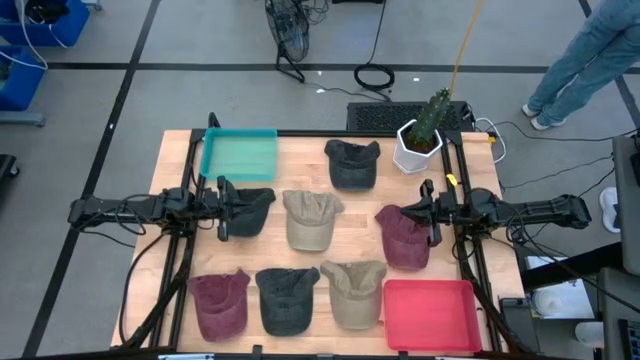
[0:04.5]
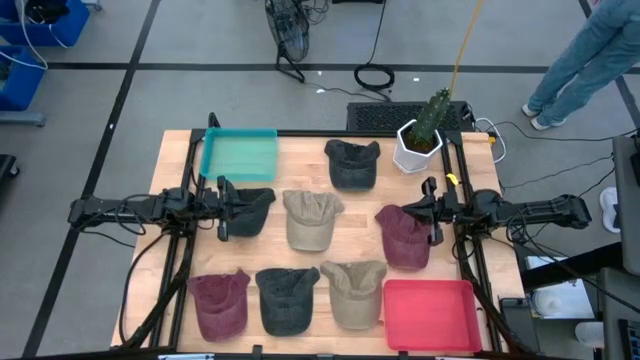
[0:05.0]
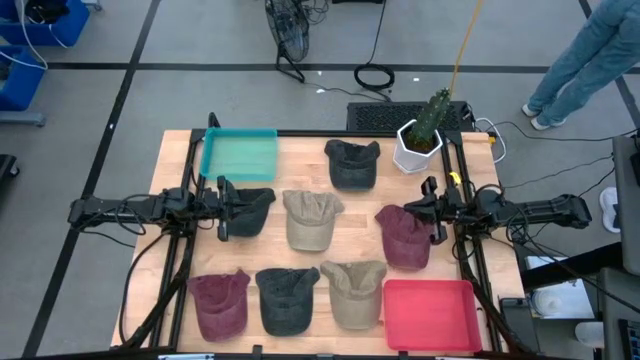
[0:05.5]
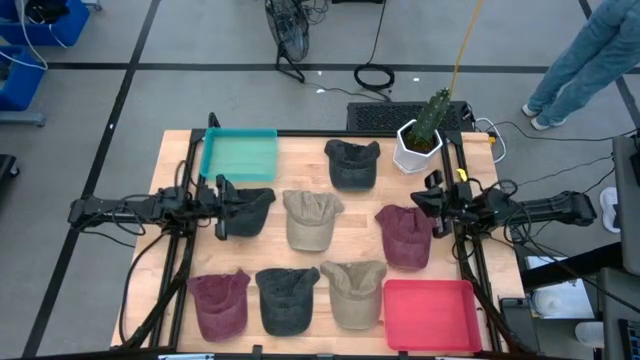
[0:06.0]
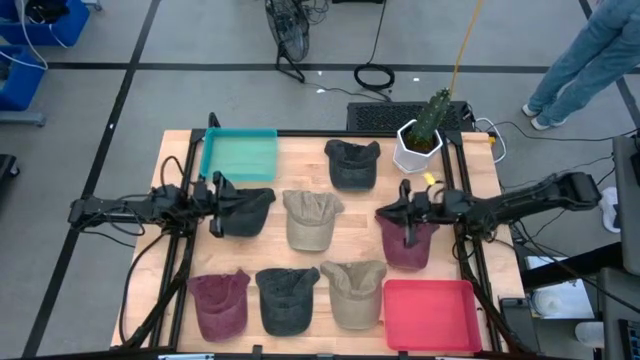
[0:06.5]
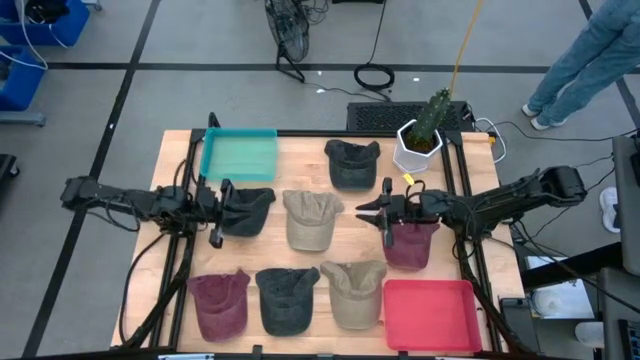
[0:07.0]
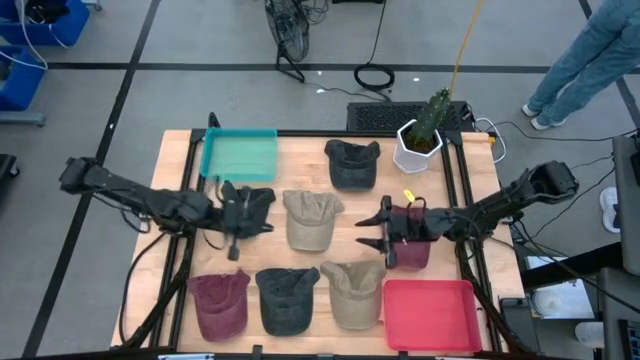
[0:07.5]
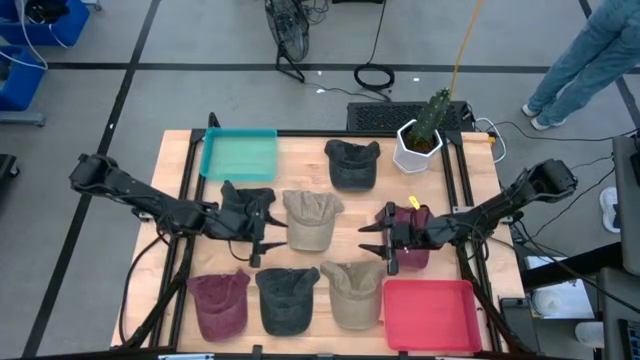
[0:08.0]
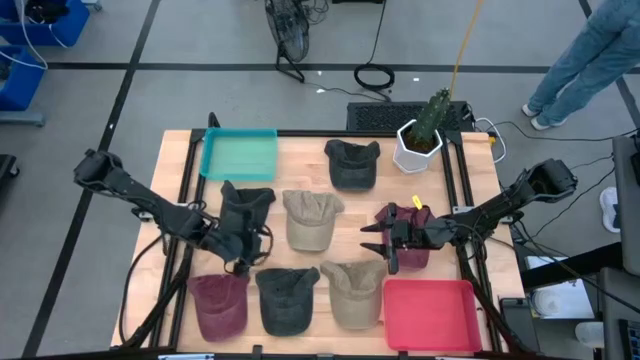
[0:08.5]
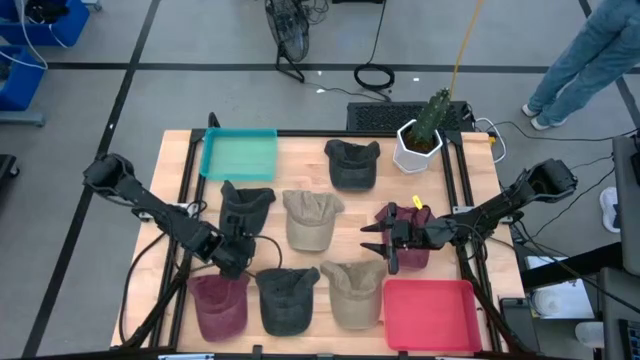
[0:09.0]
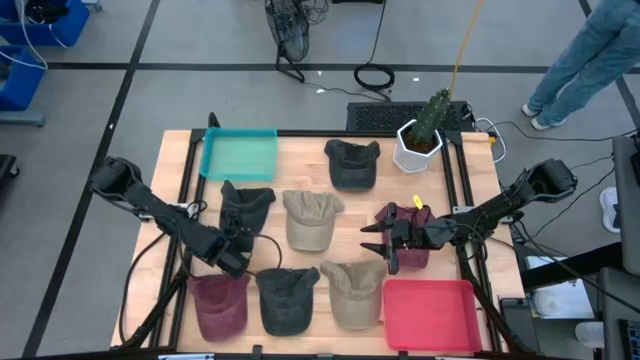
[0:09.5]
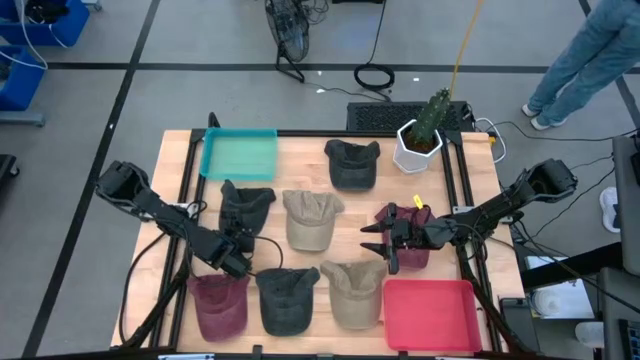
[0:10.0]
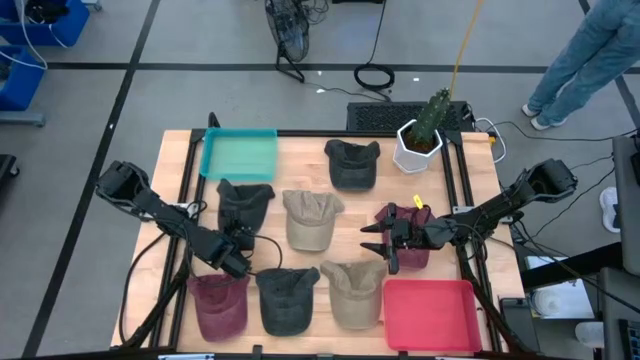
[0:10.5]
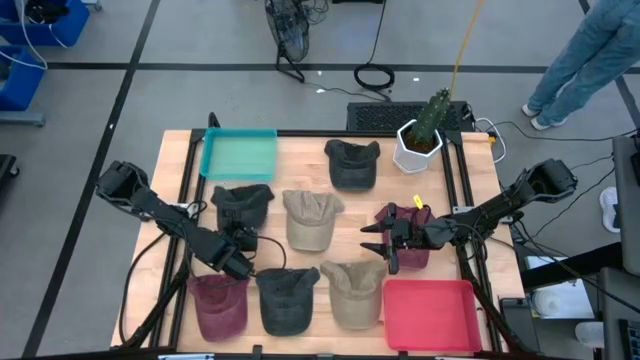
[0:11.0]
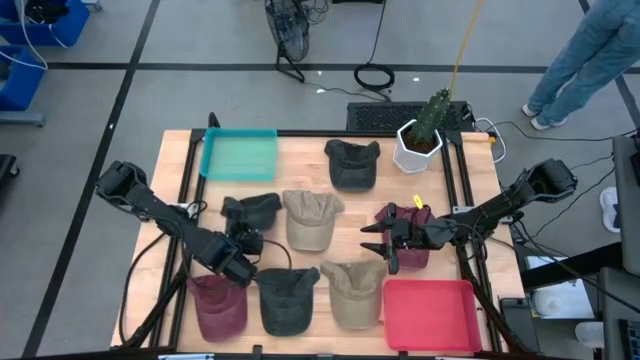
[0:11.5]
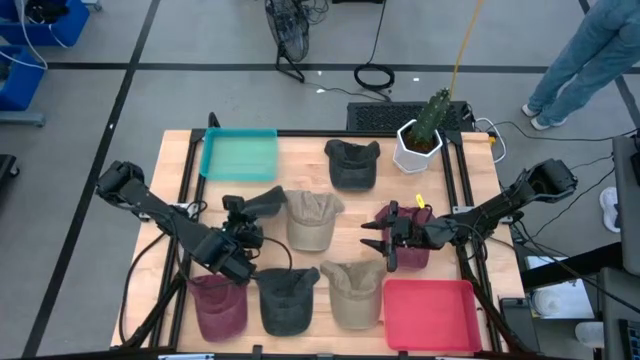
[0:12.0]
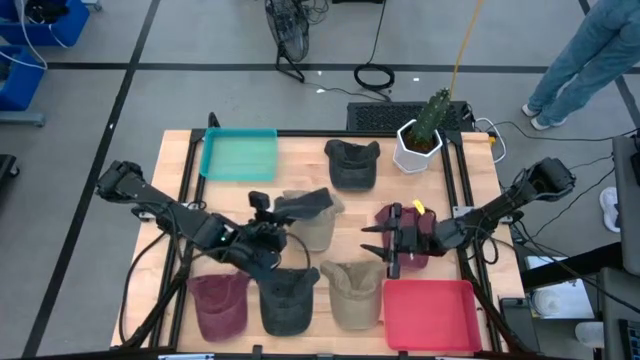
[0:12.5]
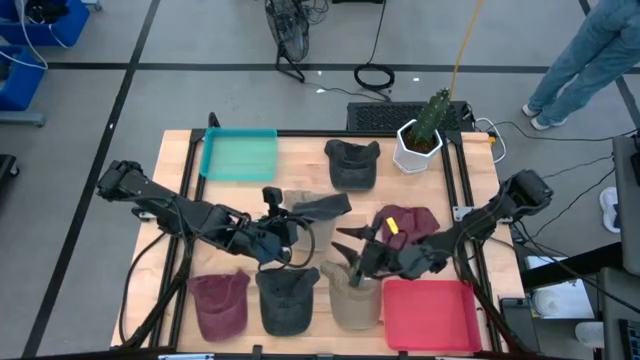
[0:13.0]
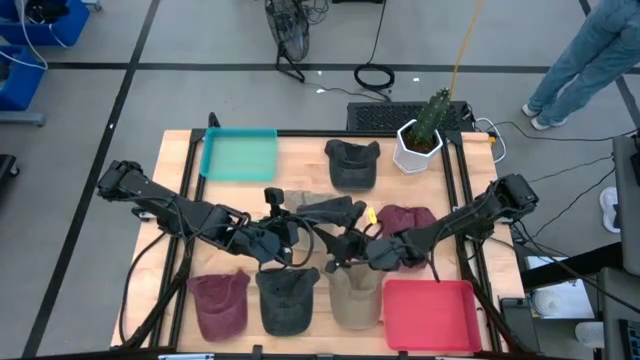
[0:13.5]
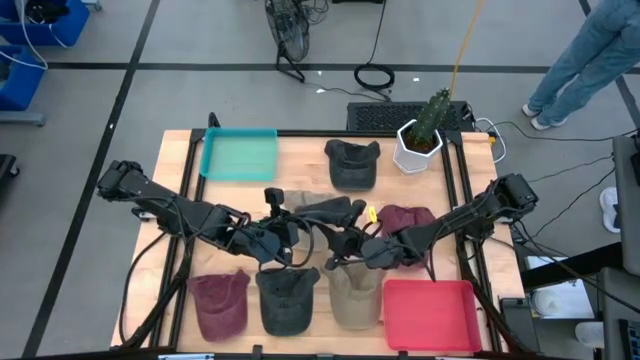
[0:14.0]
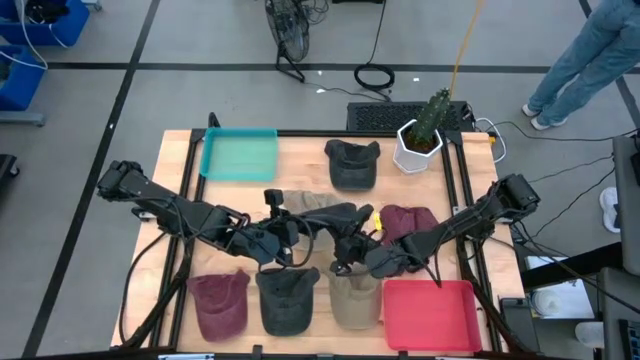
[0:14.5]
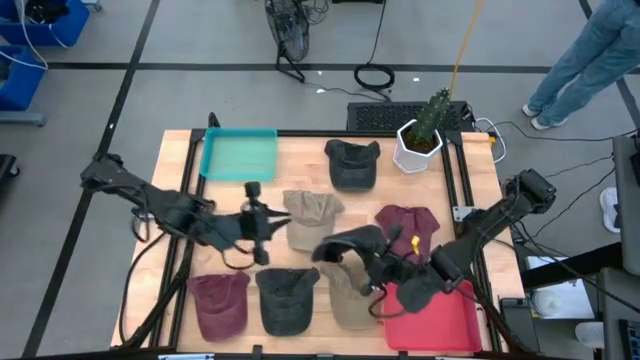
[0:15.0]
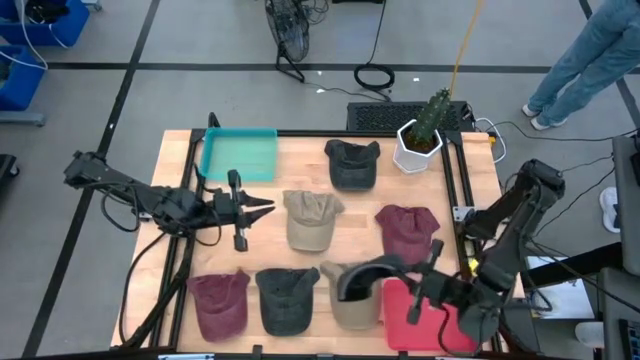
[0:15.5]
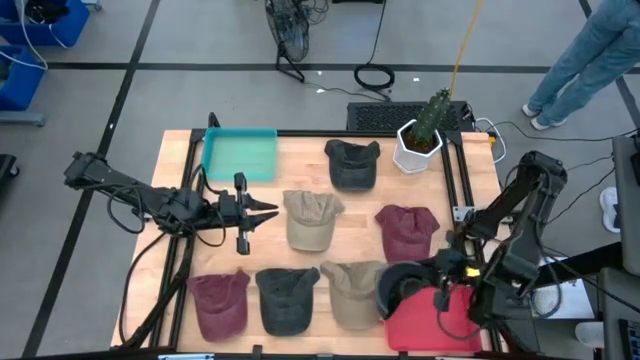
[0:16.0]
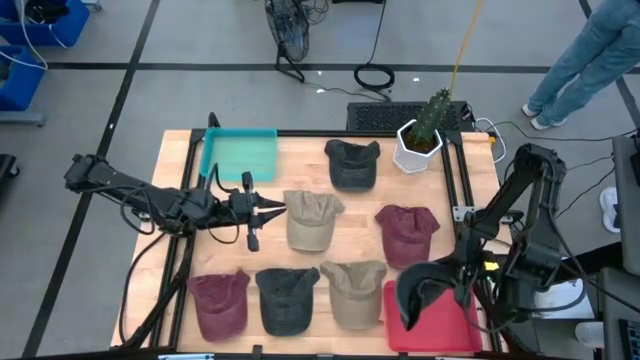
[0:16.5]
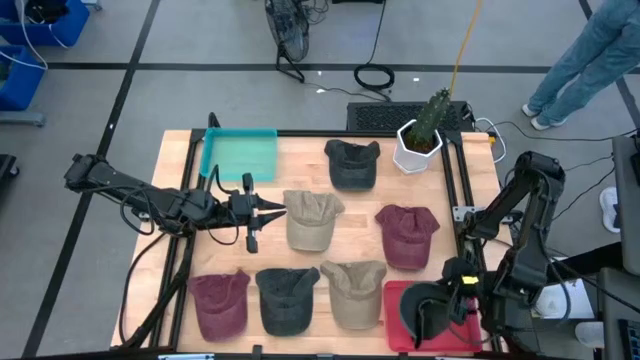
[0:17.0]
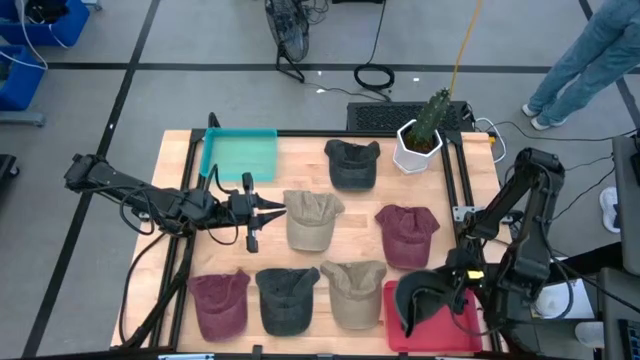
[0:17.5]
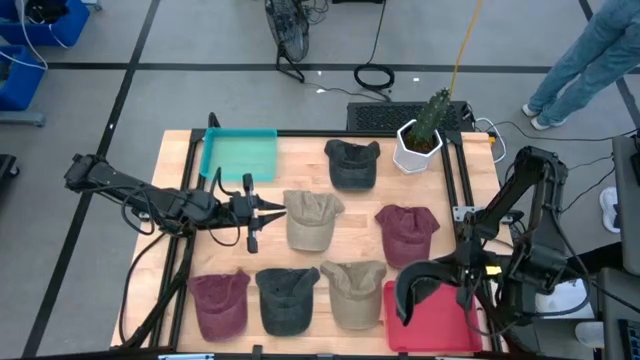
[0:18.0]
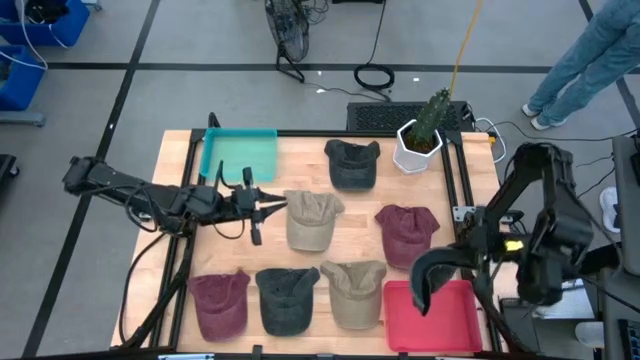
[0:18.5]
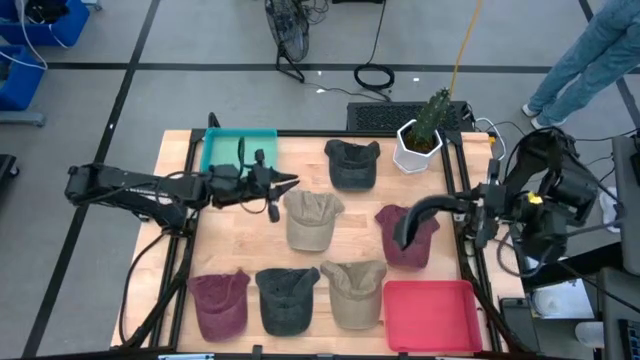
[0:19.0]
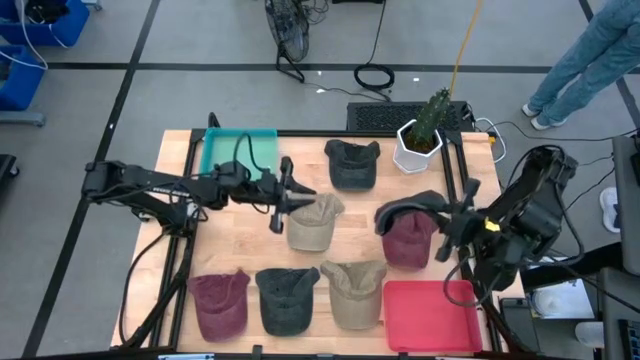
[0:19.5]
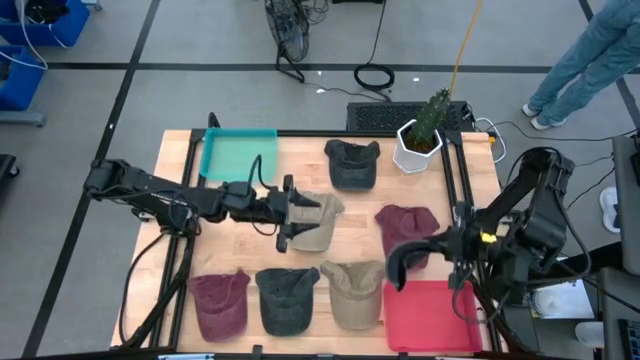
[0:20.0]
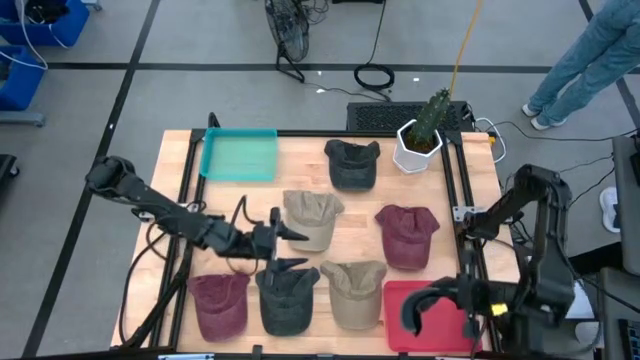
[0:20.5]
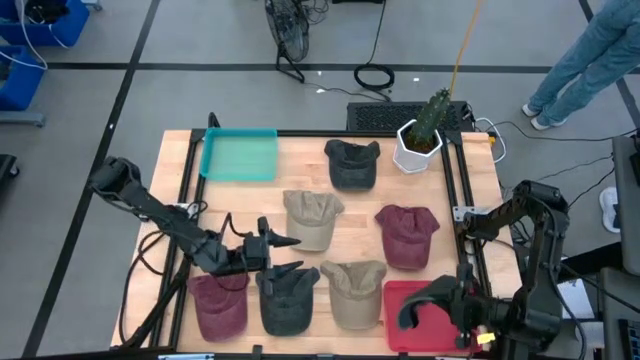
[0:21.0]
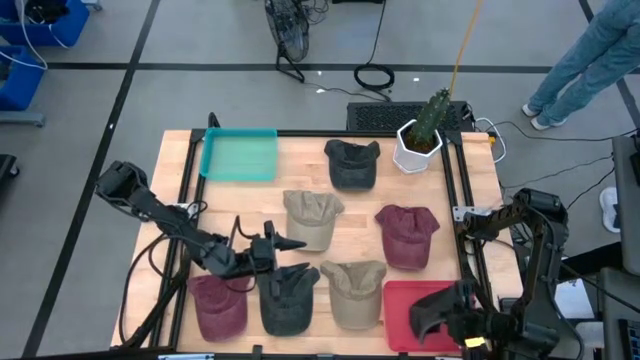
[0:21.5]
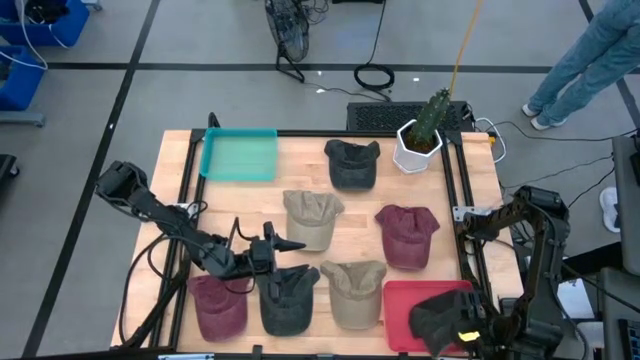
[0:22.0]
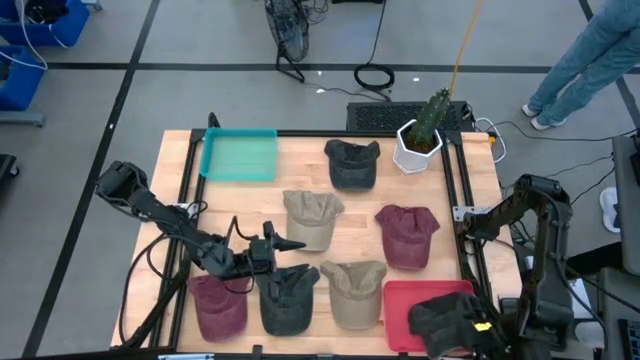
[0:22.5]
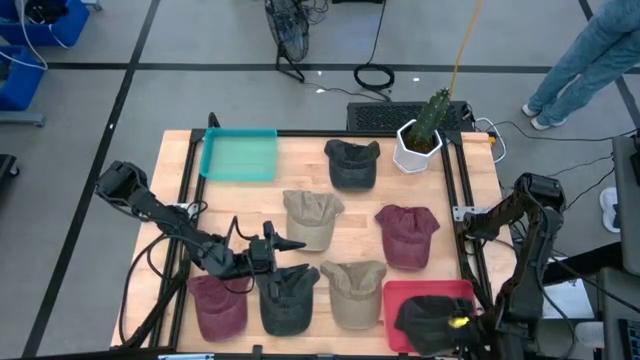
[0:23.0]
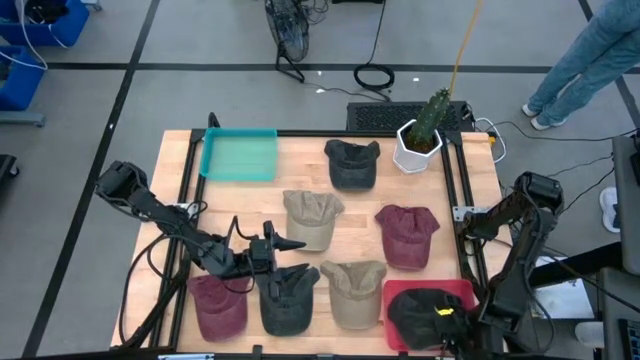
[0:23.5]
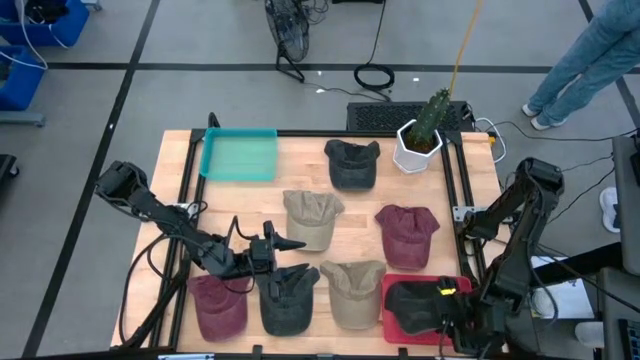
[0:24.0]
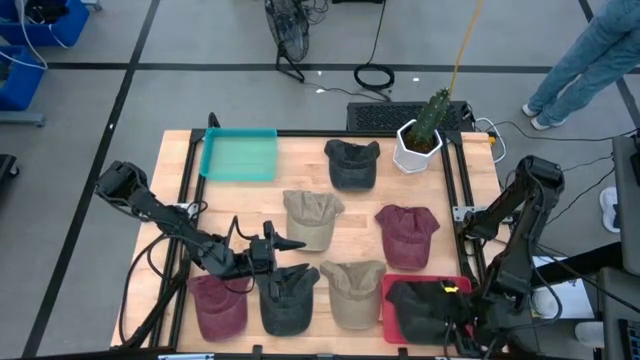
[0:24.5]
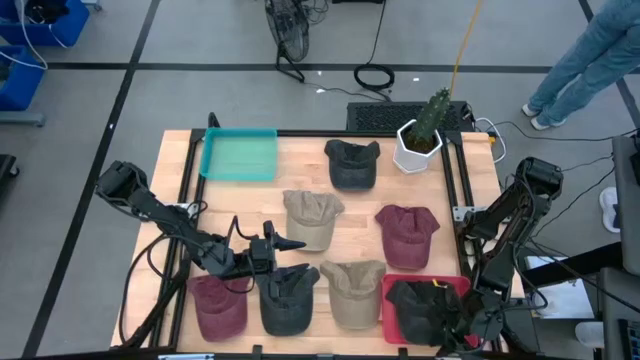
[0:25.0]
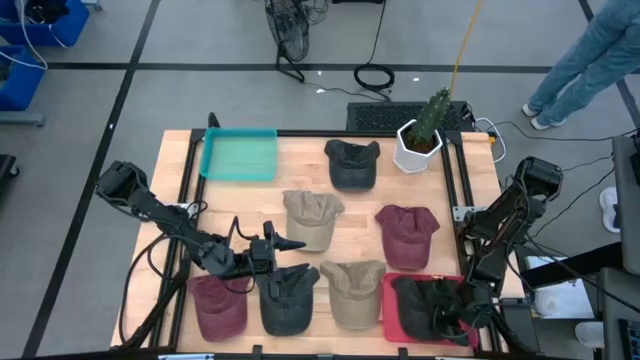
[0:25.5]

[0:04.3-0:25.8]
Task: Pick & Place hat
Put the middle left black cap into the red bin
